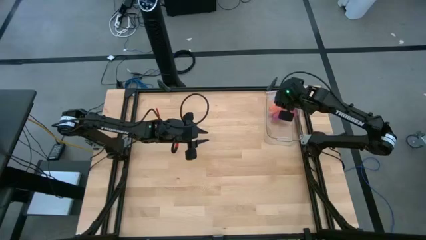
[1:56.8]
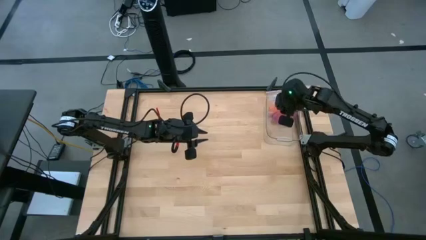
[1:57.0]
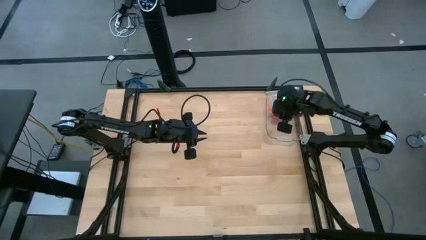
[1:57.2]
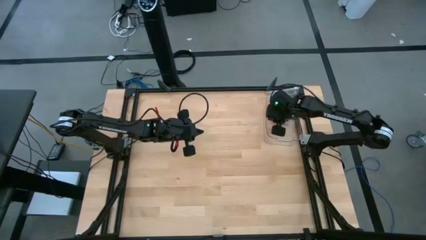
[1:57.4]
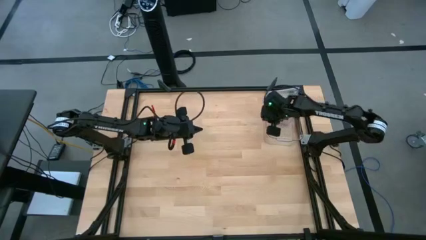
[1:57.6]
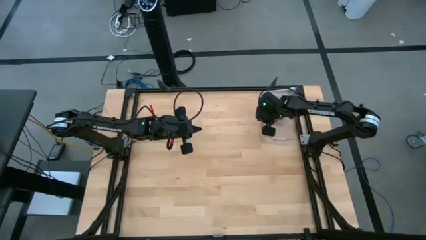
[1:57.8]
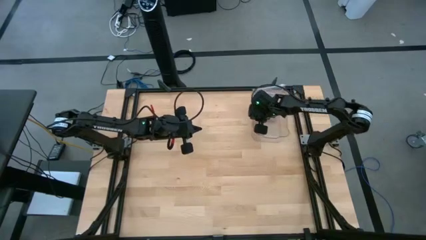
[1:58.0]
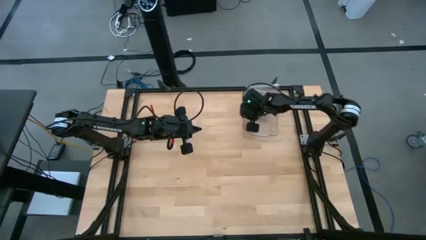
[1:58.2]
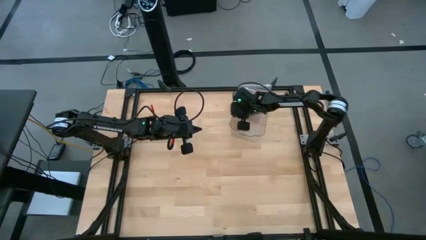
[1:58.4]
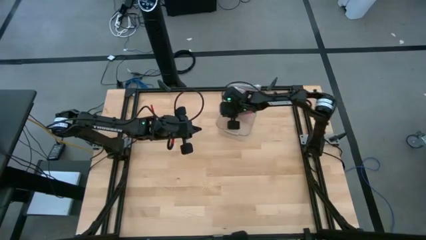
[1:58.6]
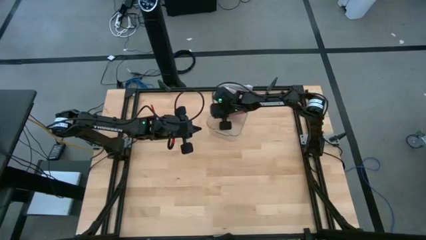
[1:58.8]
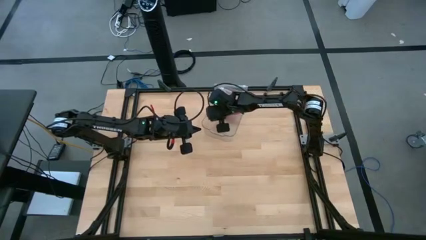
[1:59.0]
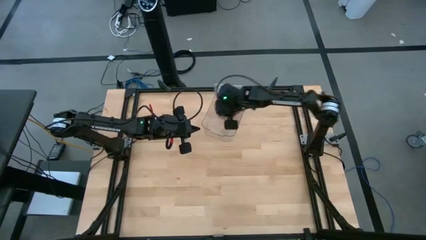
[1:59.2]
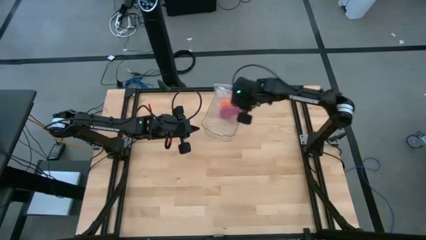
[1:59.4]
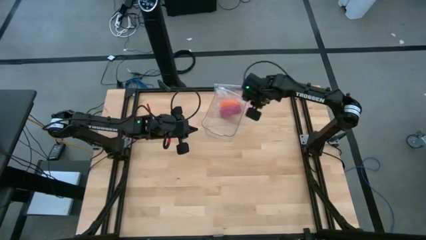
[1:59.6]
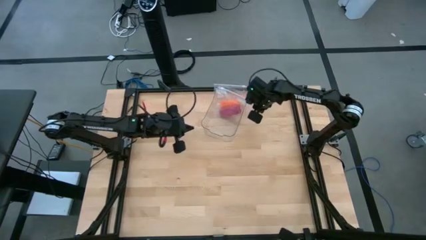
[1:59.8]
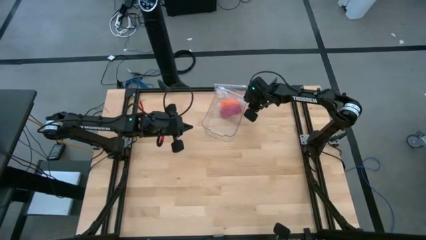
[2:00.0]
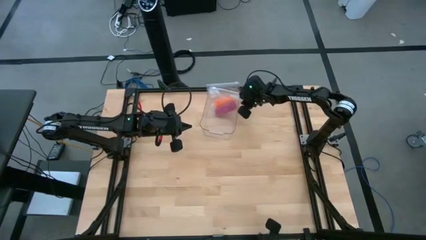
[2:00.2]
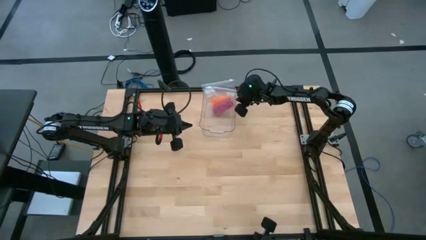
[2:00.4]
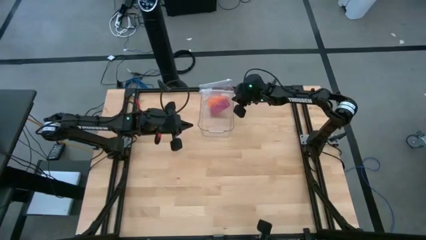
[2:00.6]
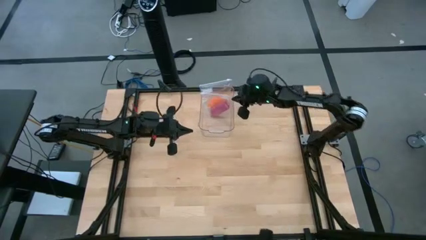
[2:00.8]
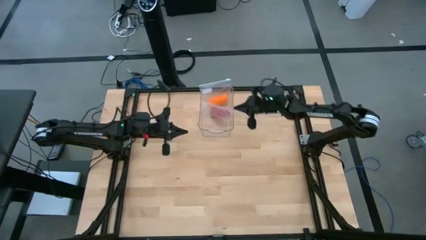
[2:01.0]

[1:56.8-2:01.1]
Task: Roll bandage
Move the transparent bin to the top center of the table

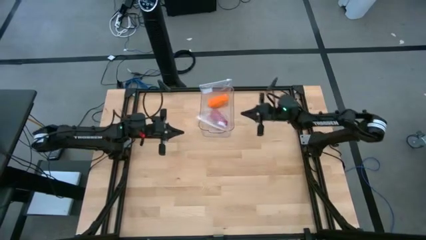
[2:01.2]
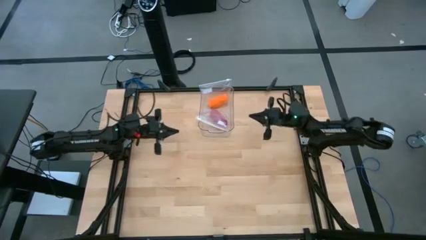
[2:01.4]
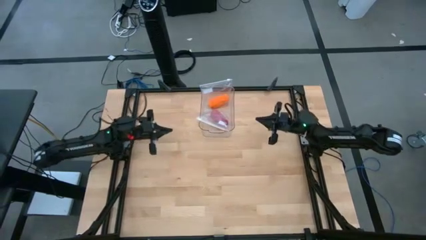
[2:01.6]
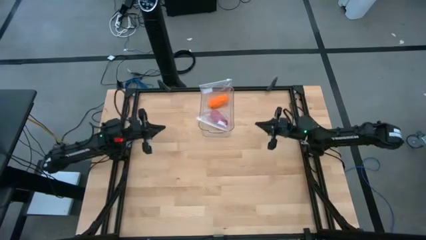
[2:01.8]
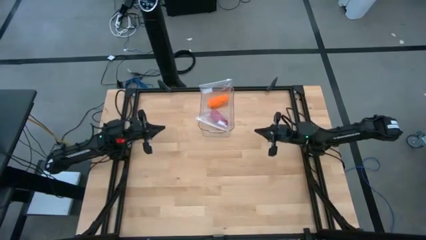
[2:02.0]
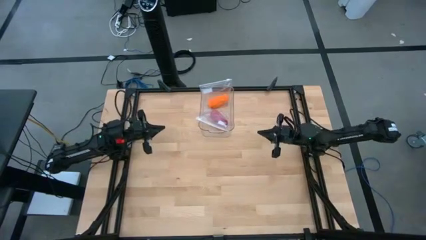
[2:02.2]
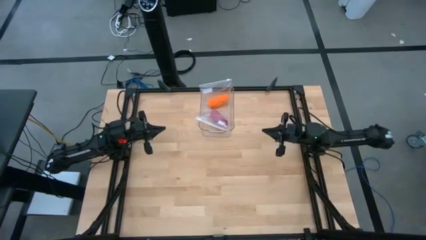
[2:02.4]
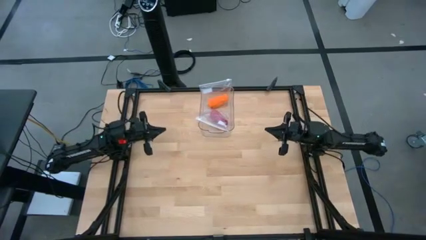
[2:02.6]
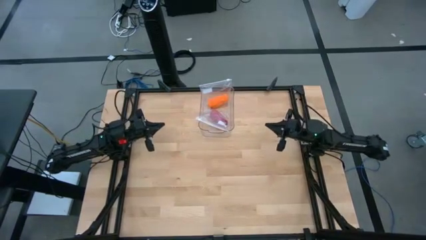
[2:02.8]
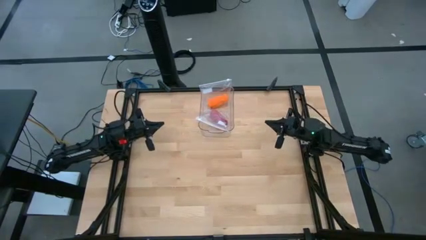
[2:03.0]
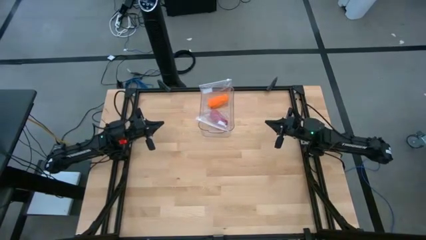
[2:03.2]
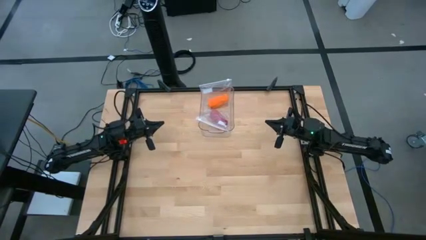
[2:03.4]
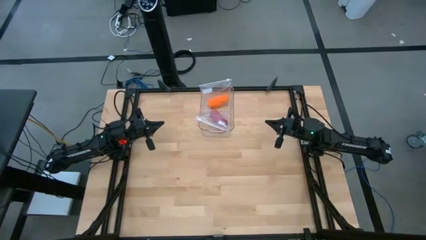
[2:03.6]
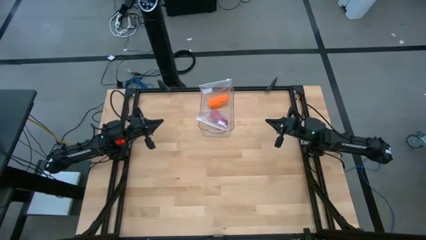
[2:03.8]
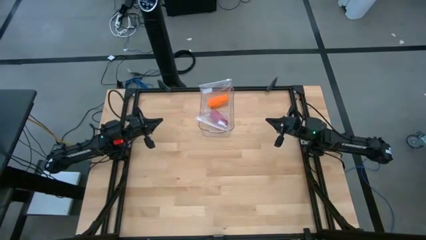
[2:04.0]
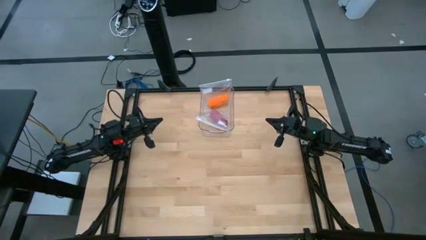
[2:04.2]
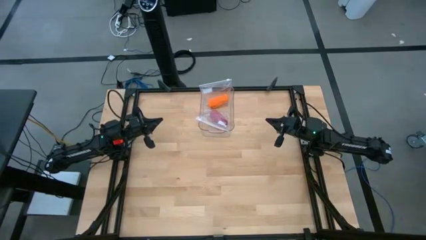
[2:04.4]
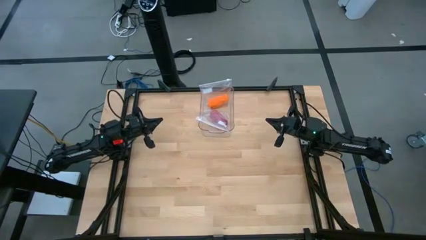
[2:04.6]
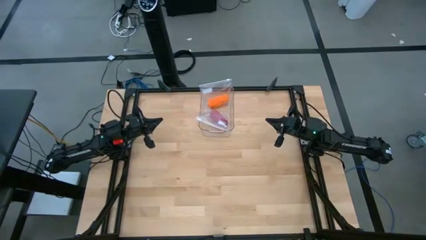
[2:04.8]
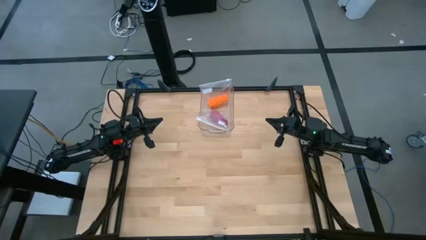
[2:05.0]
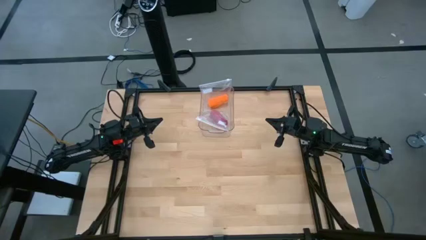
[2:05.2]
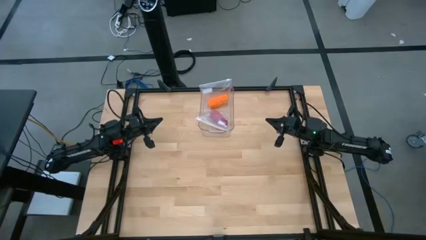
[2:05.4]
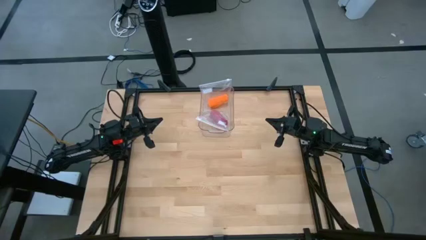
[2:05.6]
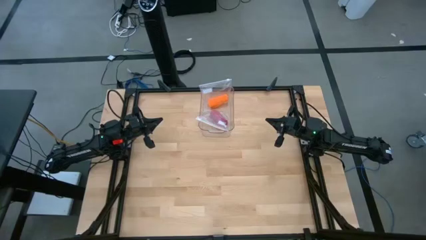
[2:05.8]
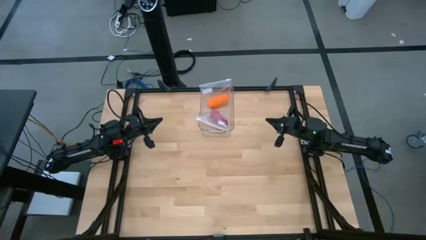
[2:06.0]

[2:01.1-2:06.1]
Return to Home Position

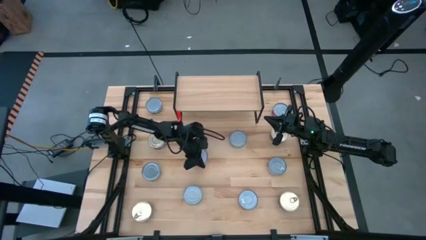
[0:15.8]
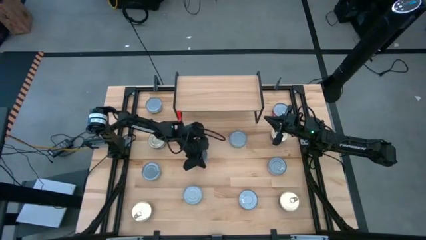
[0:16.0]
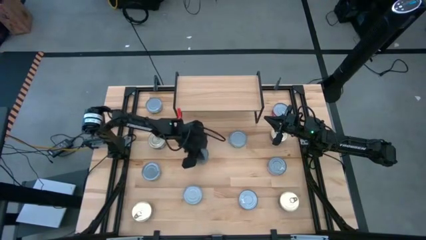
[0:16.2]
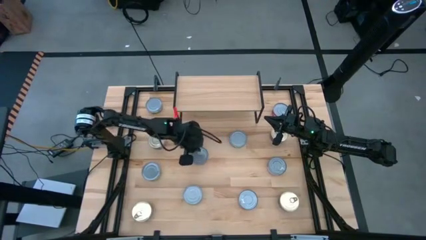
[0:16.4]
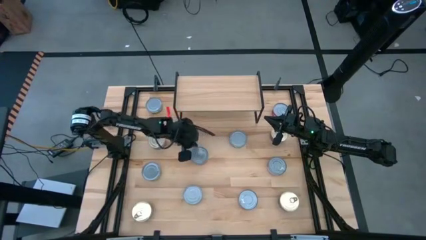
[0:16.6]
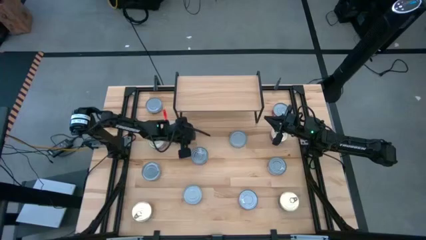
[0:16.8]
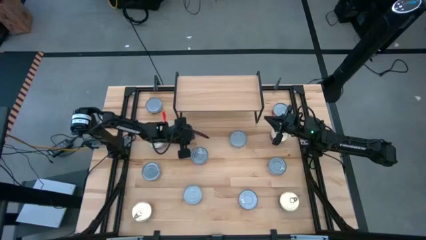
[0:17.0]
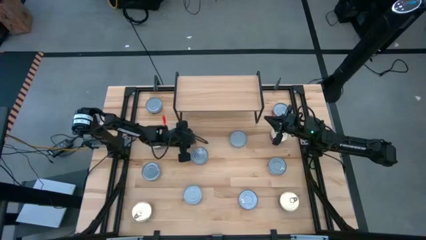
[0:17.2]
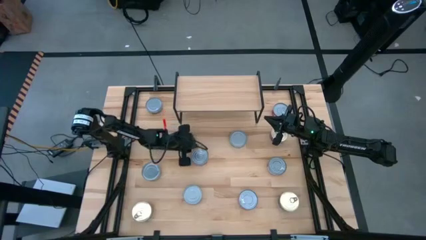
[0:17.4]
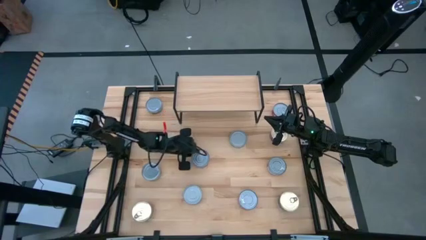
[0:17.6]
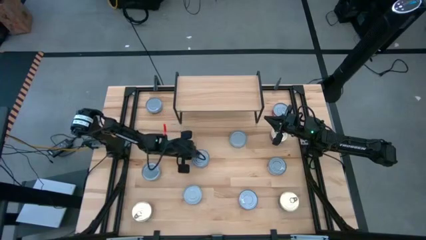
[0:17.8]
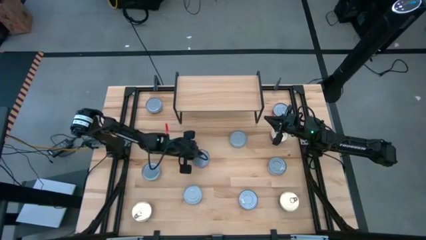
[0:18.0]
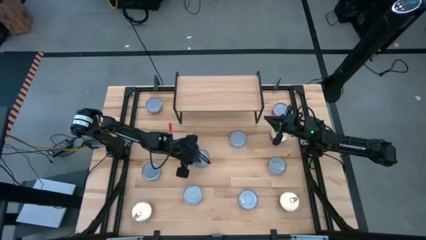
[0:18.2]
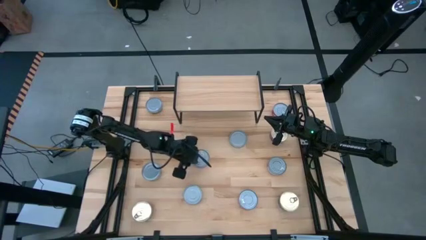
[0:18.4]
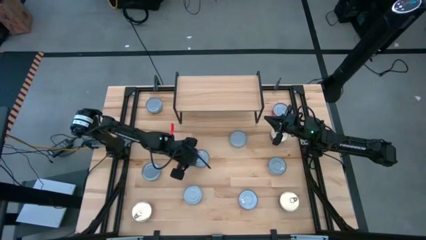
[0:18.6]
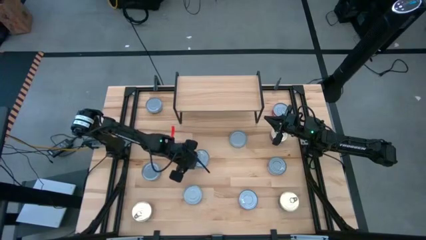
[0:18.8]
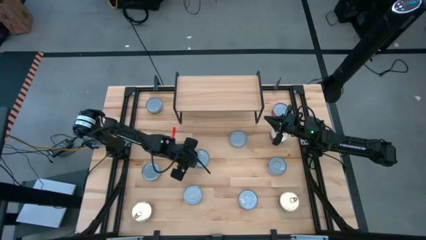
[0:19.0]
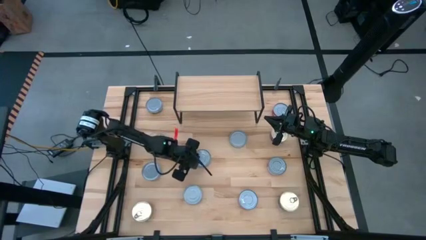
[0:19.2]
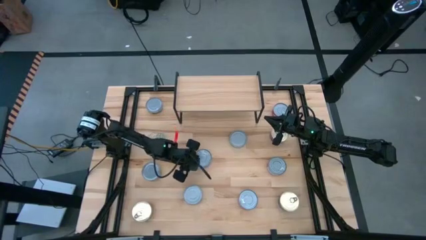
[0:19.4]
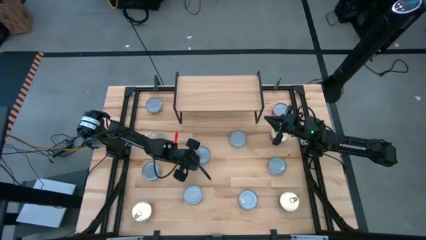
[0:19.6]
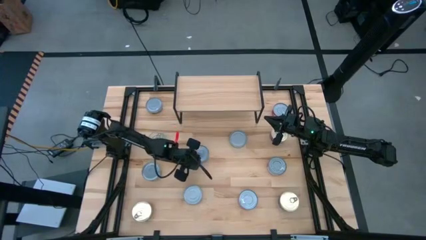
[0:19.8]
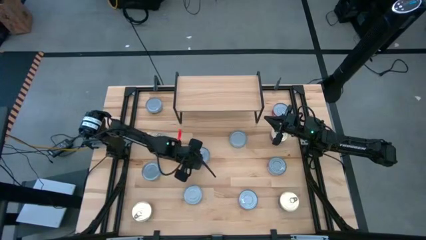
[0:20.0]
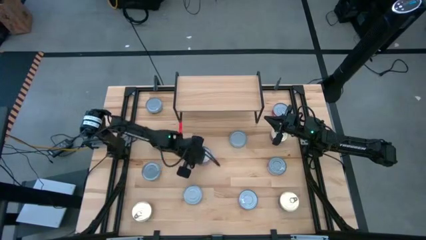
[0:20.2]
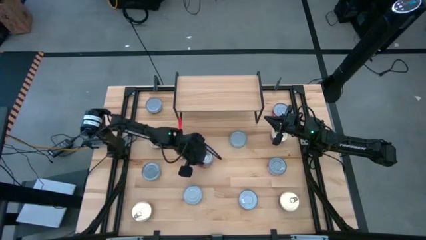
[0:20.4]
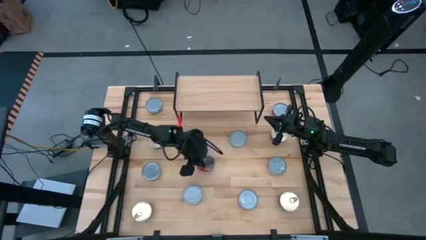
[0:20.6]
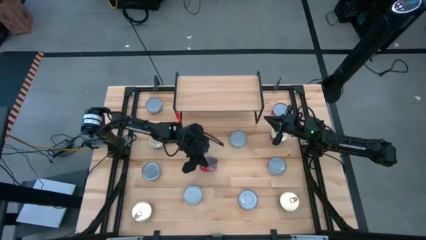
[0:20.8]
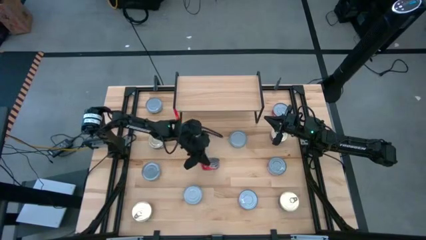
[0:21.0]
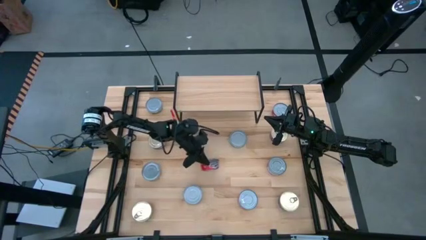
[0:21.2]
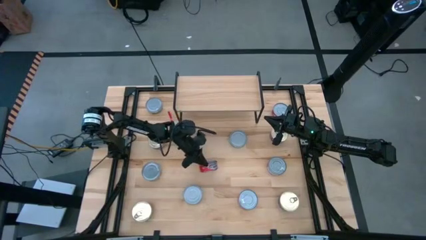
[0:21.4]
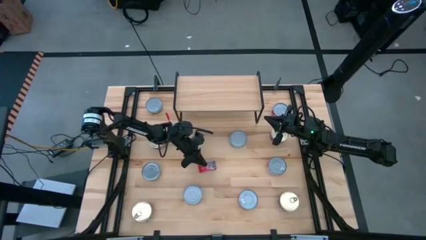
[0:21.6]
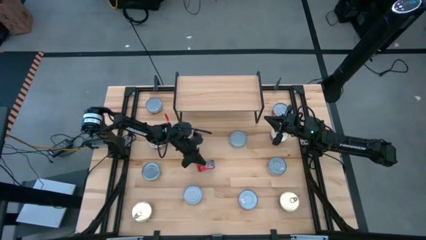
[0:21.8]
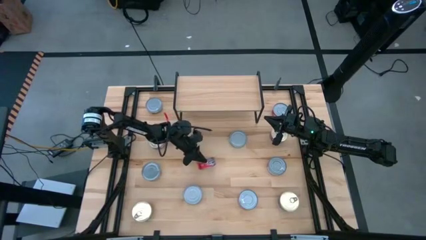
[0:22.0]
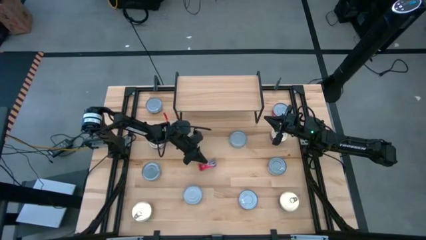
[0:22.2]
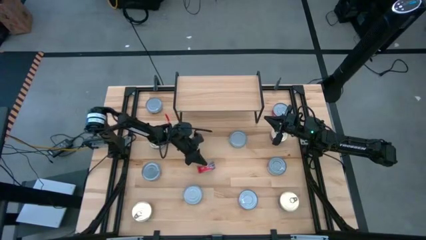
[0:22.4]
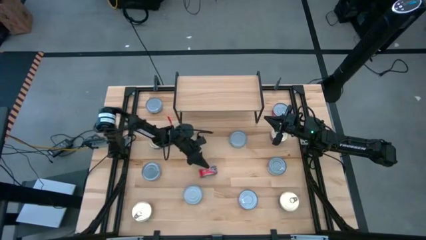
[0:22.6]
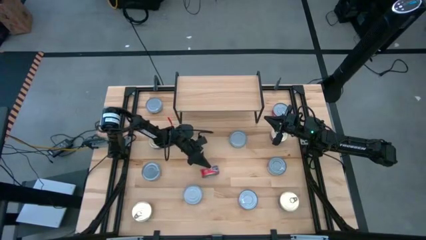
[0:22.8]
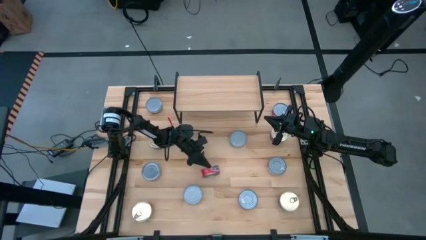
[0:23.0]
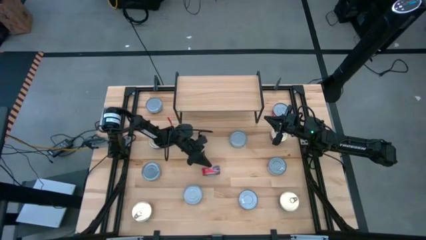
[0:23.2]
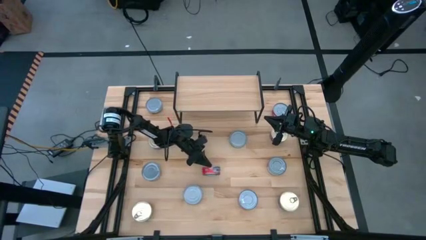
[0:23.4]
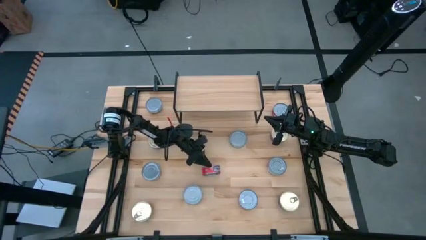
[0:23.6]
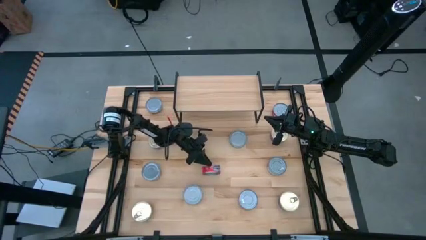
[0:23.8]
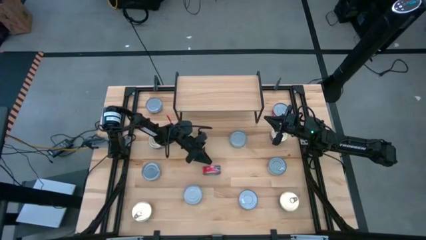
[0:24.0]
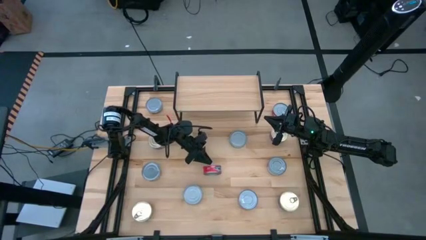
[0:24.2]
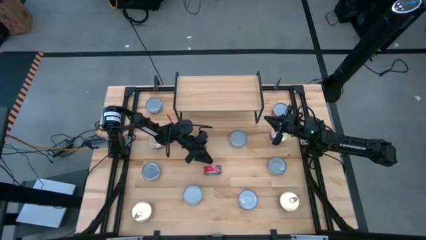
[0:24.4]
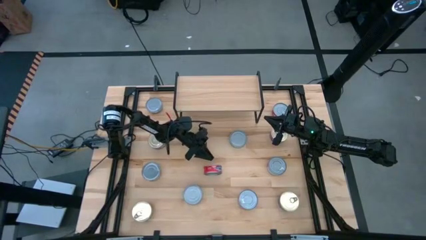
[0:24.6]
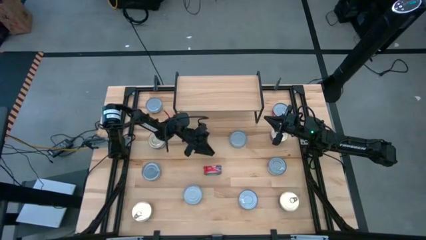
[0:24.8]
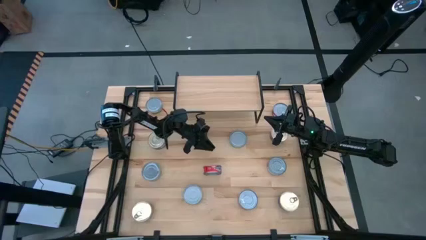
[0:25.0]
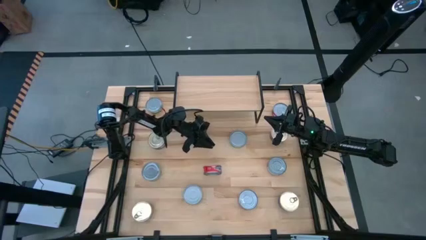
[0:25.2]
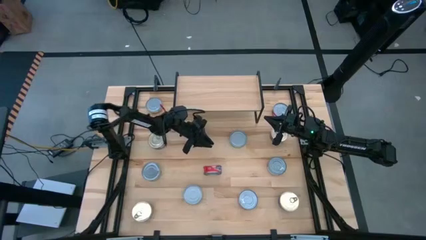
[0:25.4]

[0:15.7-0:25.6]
Task: Stack canned seafood by type on shelf
Put the red tuna can on the shelf
